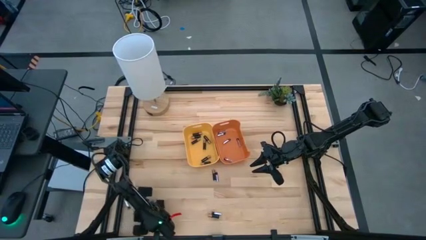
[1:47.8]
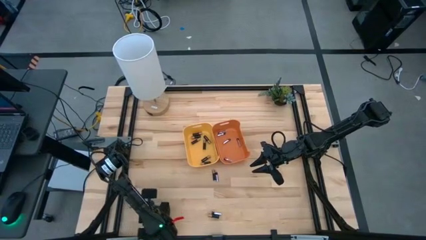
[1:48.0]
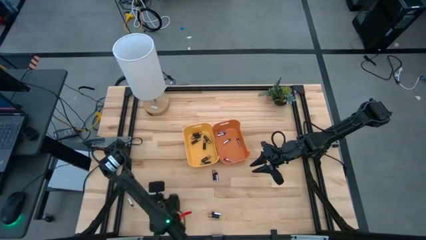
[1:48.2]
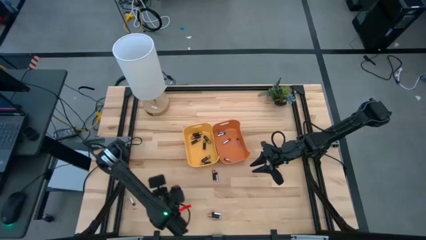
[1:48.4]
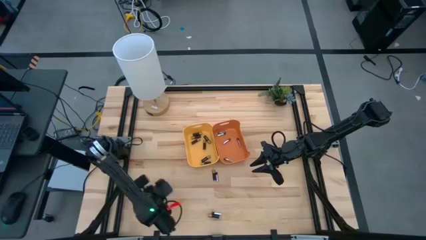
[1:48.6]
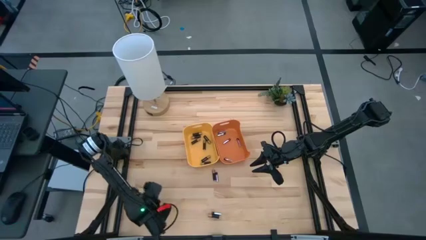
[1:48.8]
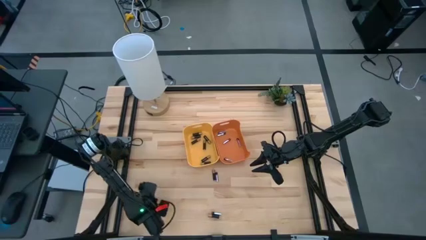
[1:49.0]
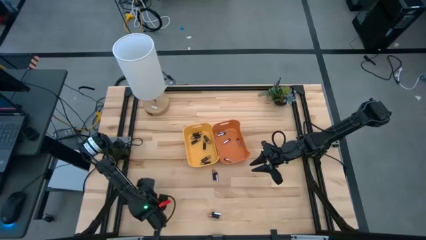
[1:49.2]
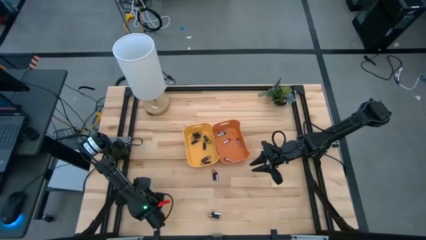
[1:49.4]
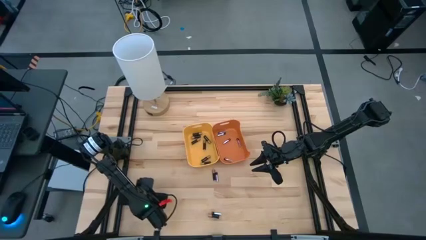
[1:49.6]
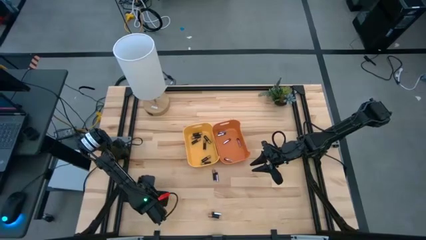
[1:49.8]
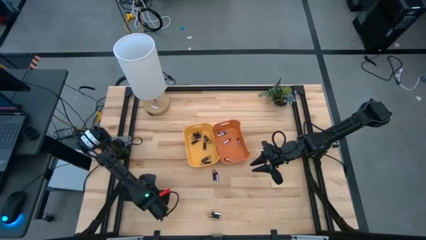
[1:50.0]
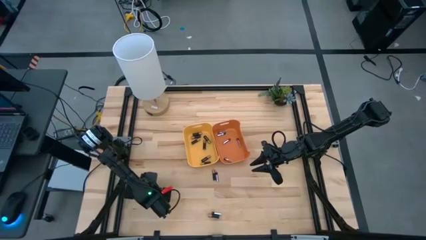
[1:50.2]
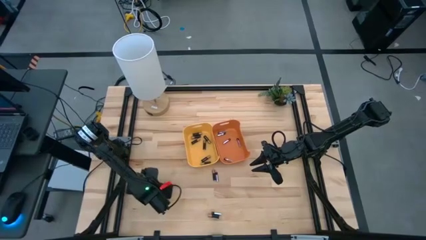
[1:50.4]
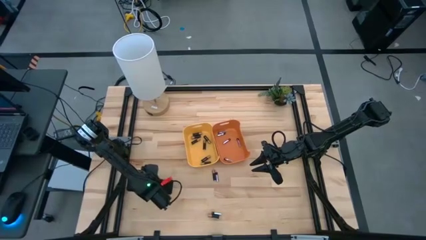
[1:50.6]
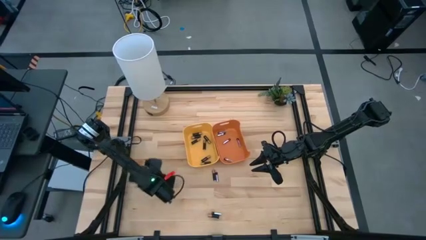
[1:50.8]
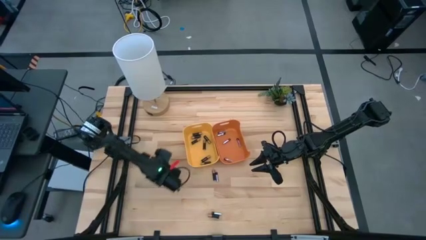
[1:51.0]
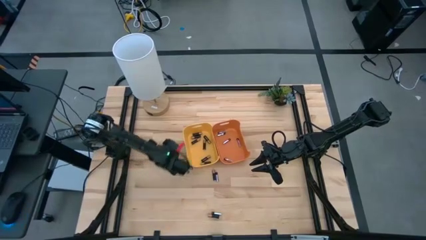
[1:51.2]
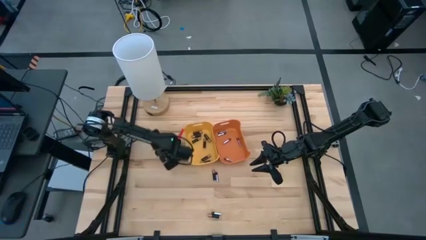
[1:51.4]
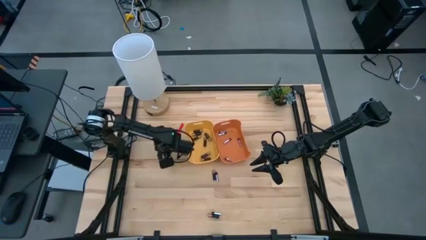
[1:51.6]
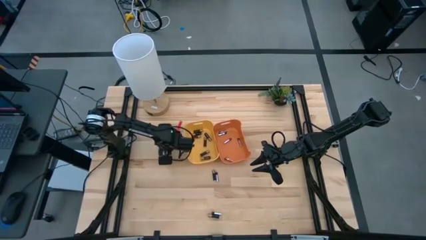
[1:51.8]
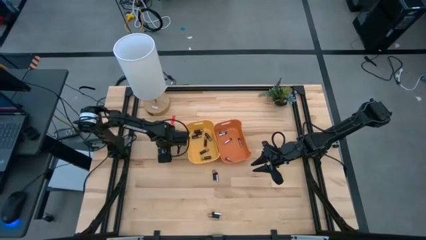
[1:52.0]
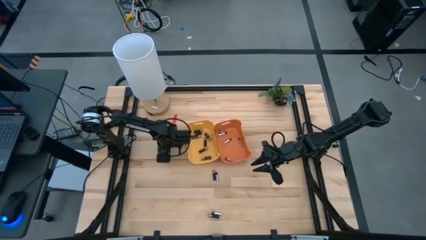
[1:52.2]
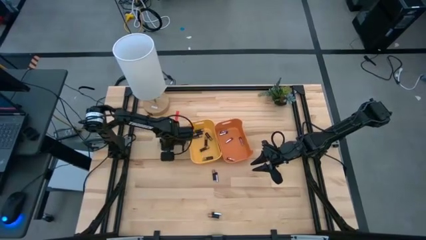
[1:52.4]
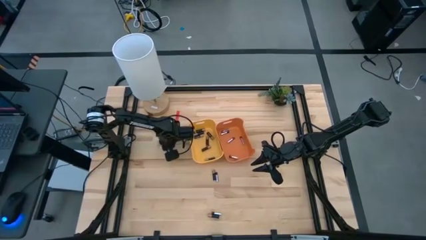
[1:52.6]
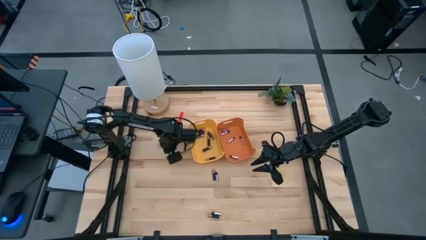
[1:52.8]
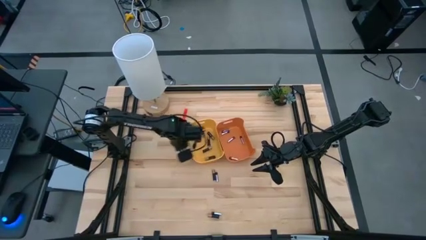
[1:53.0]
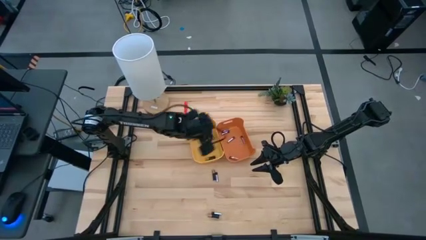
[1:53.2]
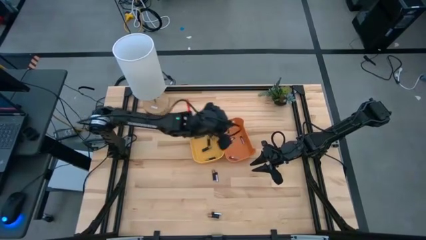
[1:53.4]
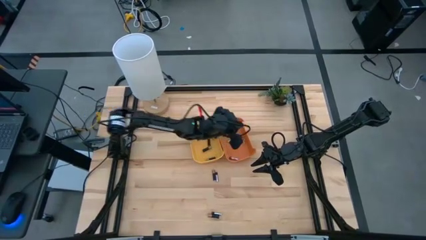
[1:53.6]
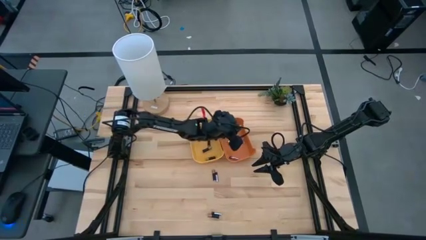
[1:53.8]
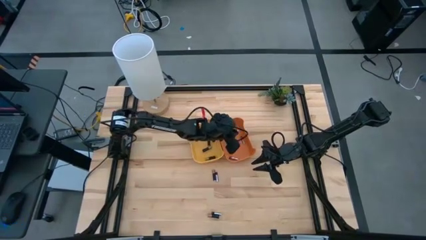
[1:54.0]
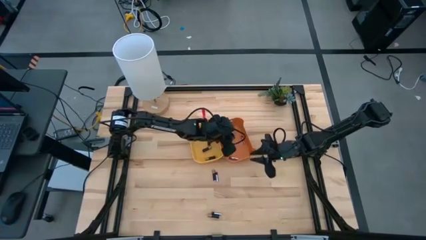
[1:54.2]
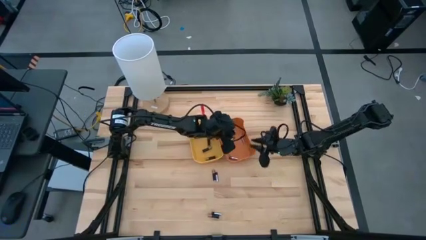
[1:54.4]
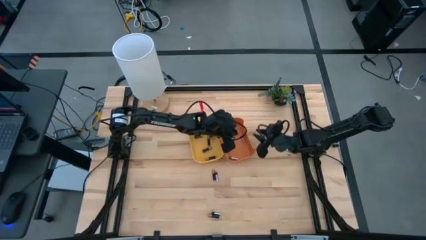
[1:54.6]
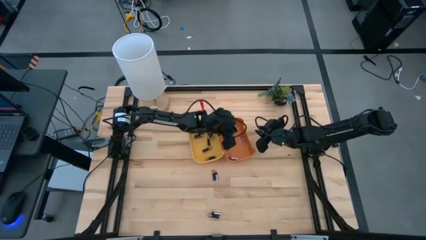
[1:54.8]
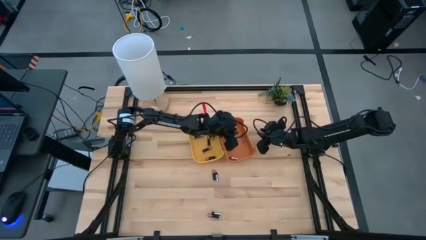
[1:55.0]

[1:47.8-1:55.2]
Task: Sort batteries
Put the bottom left silver battery into the orange bin

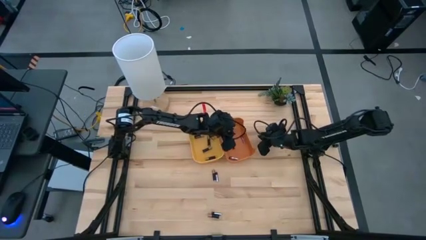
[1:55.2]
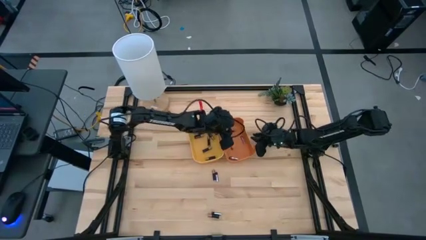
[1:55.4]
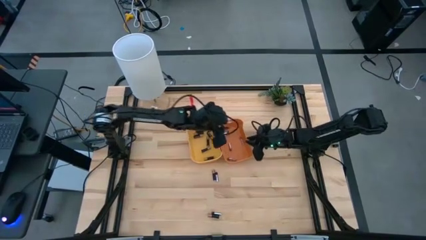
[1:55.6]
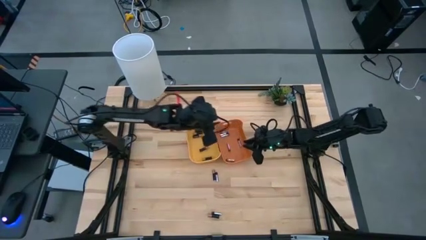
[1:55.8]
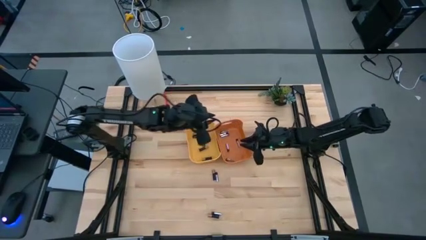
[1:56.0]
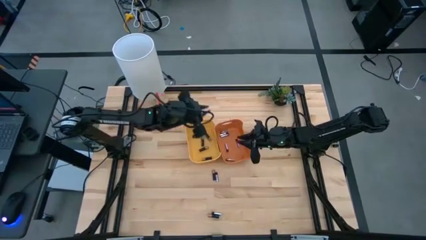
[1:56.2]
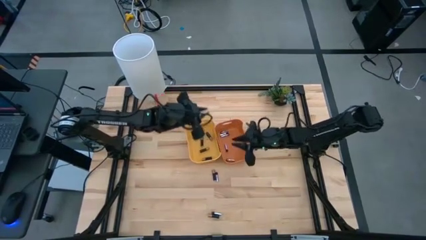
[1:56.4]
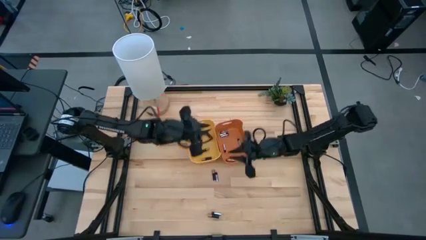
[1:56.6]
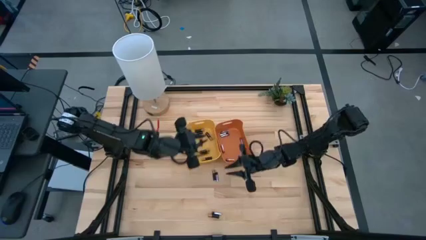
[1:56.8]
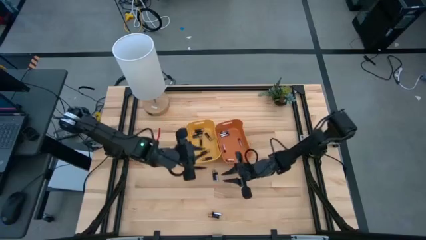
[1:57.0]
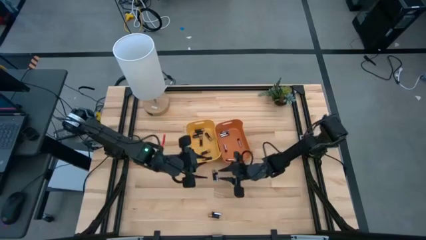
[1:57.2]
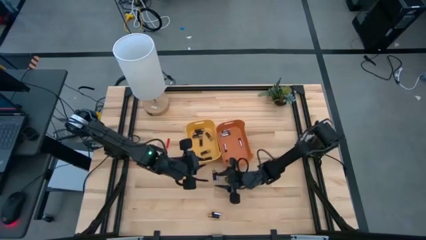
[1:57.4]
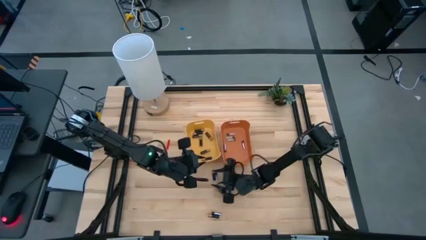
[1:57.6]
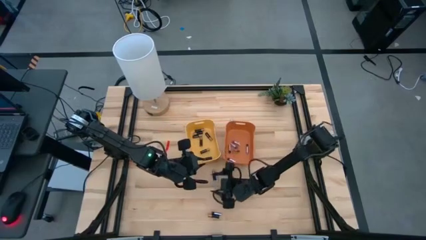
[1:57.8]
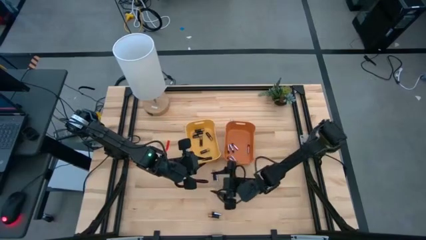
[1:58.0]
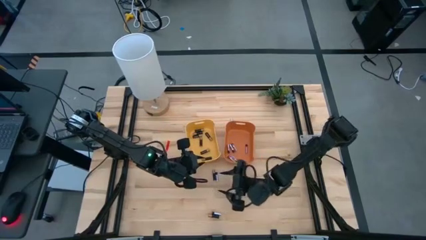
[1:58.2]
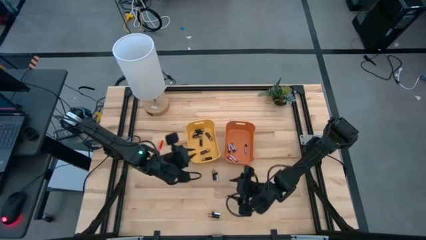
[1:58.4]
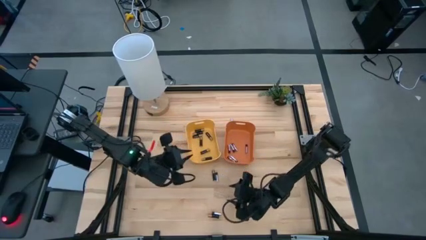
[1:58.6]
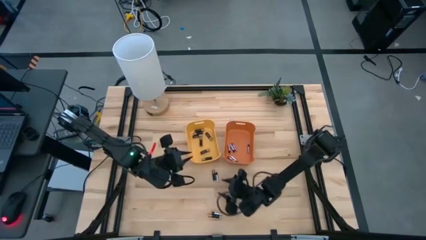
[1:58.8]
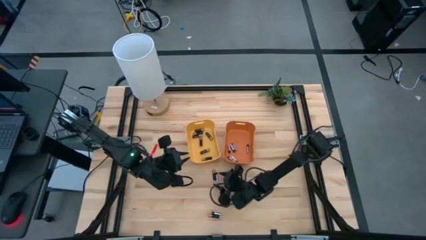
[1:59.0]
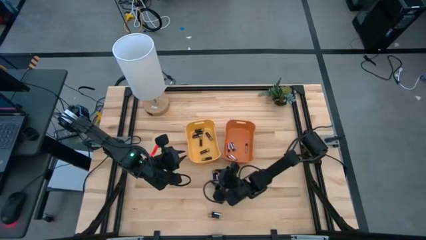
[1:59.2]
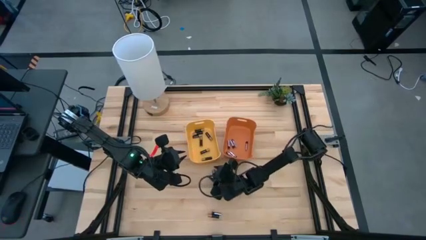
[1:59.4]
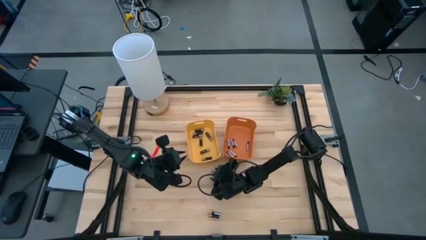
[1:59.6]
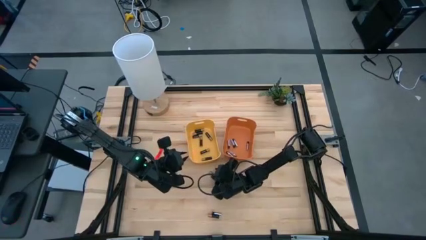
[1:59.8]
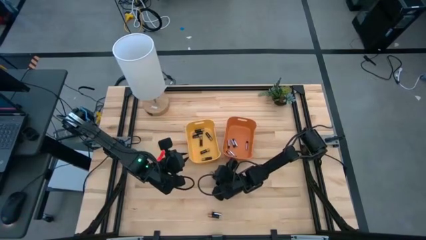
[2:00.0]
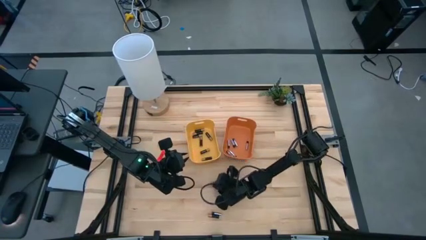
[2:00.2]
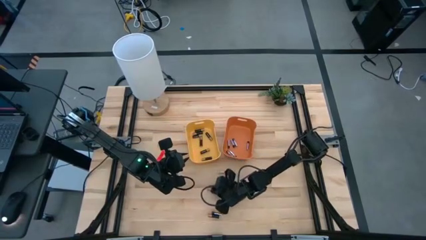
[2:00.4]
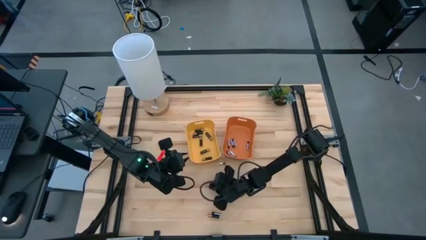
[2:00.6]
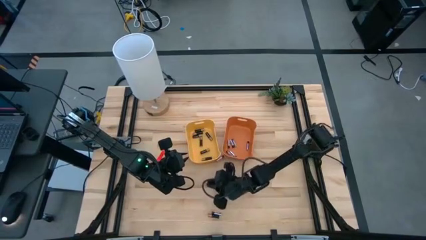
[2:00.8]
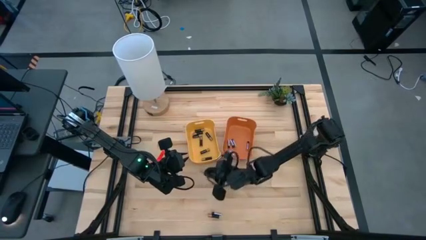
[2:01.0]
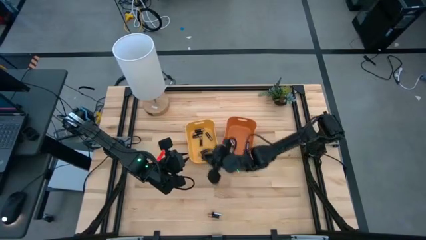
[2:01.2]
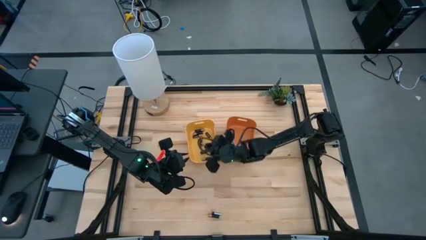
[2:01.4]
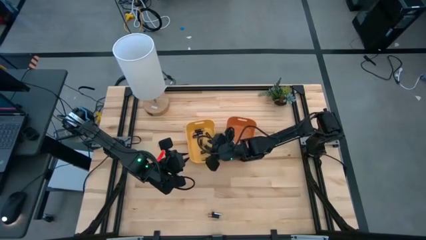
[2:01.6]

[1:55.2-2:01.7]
Put the top black battery into the yellow bin

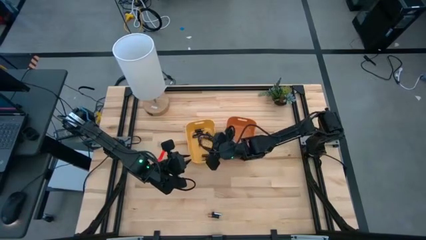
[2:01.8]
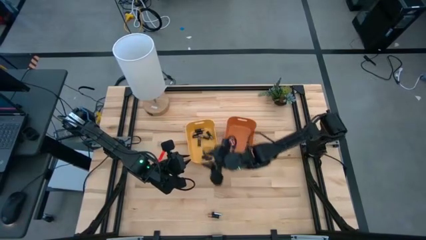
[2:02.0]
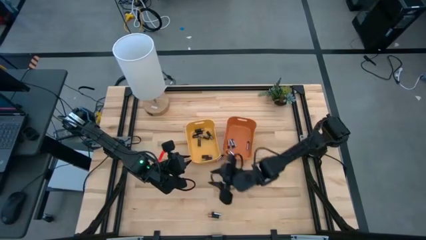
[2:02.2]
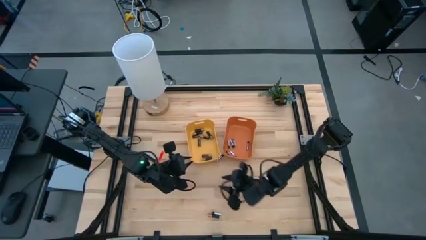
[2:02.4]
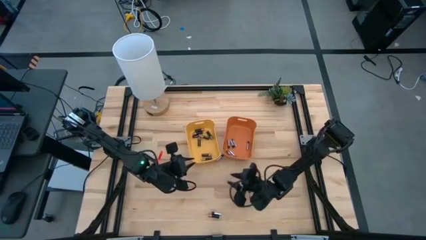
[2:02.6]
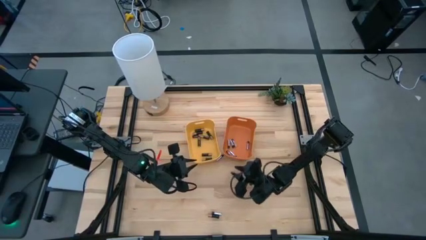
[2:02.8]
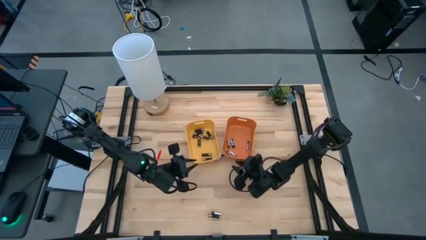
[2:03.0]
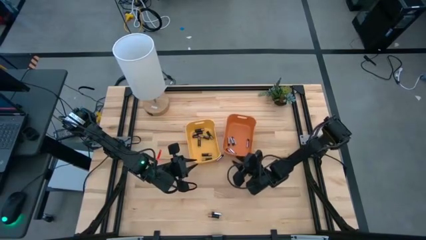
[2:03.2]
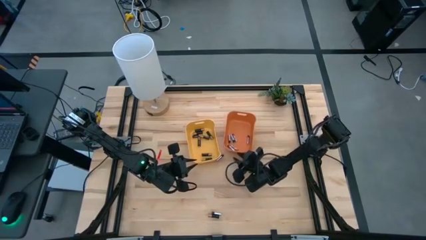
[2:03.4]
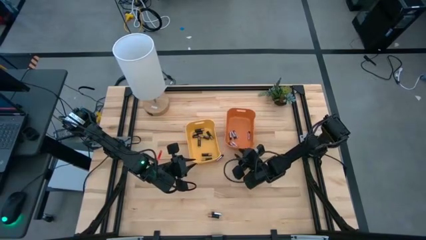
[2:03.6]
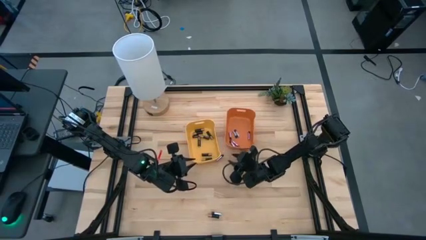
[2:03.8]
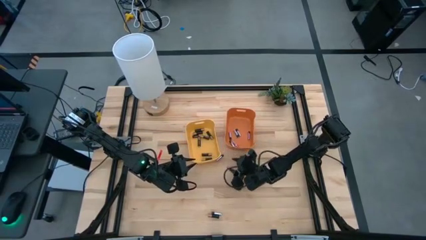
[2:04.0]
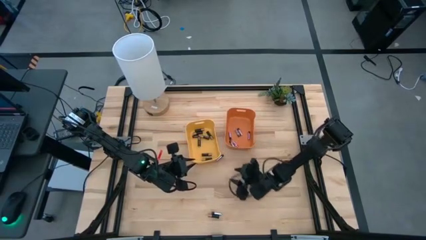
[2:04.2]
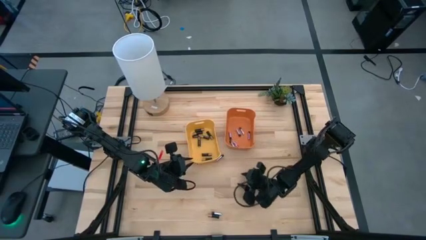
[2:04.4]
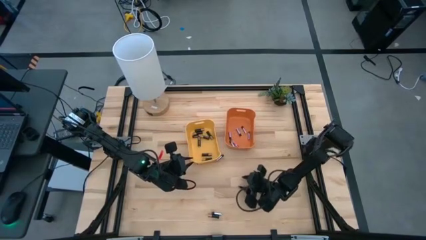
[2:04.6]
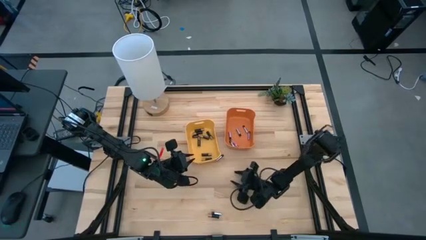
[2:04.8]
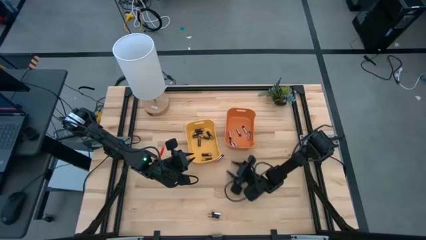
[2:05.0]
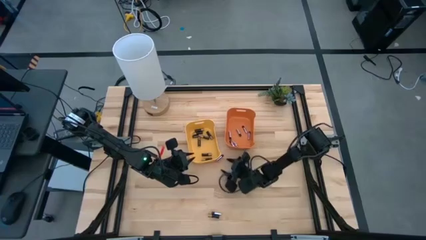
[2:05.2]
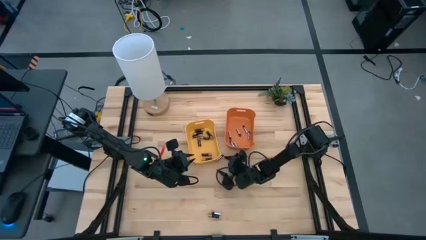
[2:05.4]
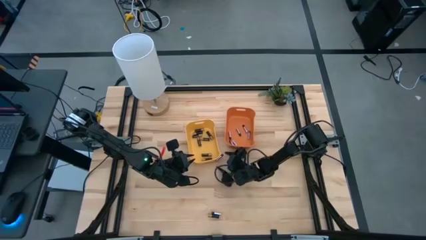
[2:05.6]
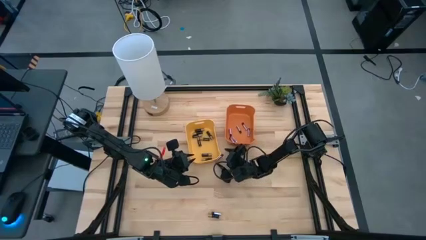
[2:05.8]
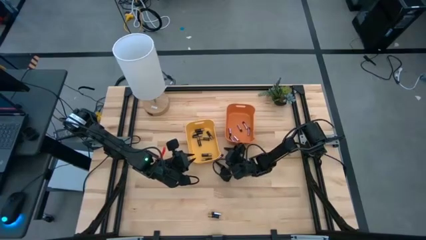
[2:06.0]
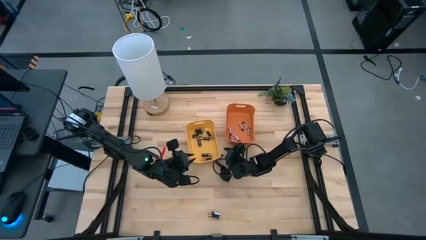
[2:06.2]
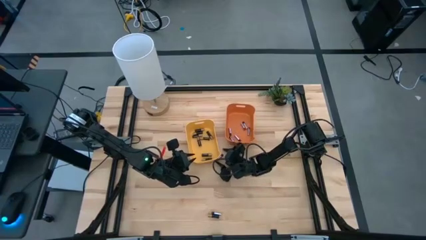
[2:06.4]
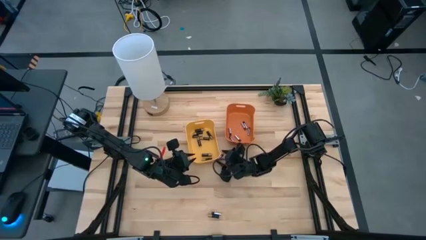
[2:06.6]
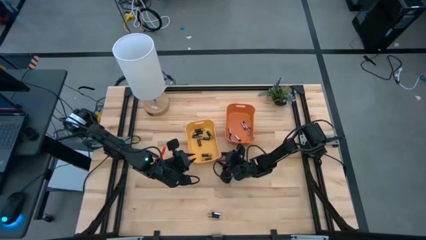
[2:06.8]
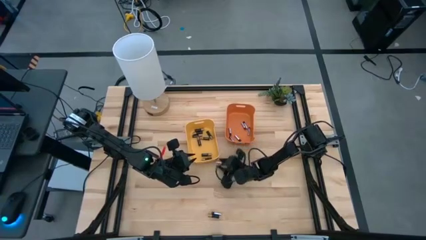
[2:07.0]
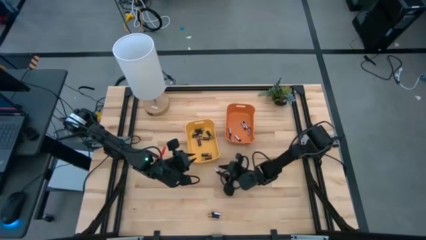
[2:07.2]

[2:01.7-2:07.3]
Put the center silver battery into the orange bin
